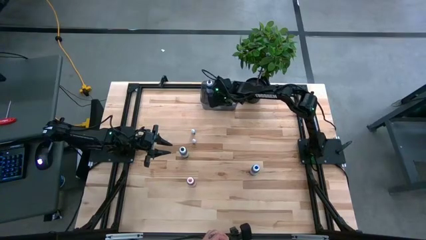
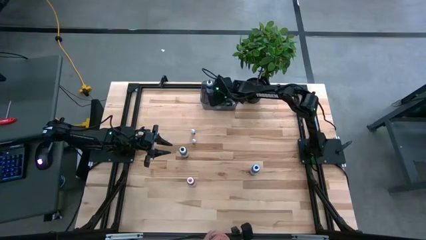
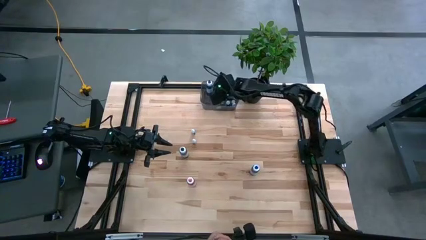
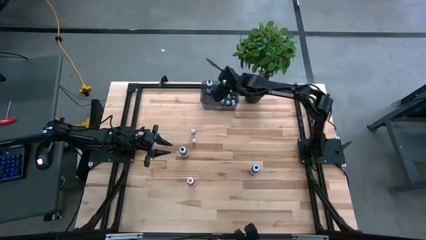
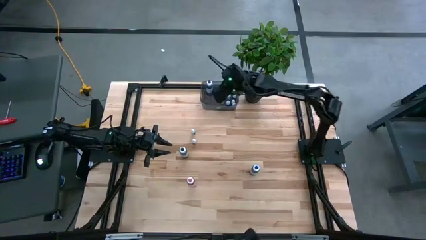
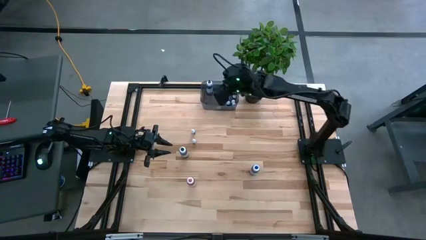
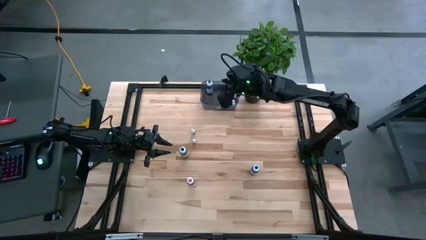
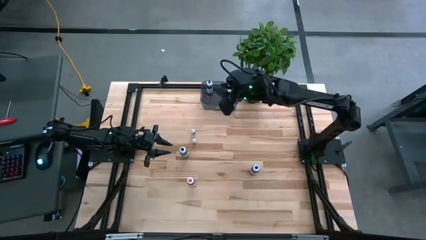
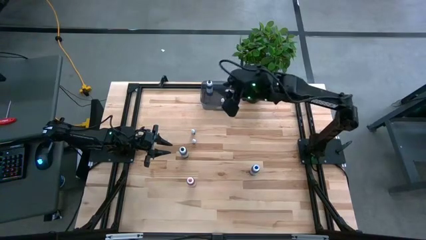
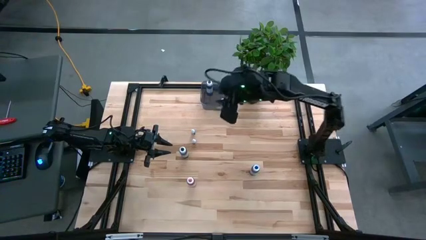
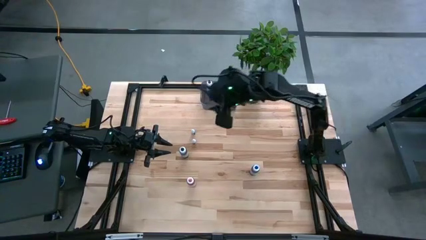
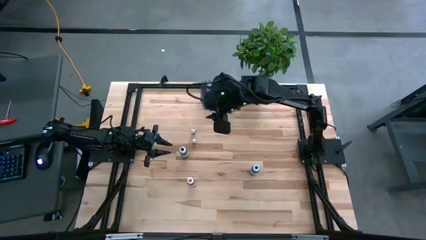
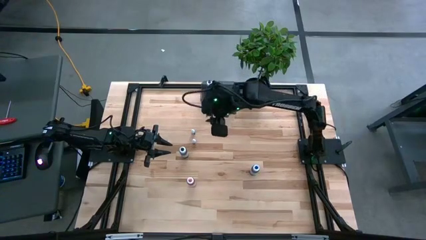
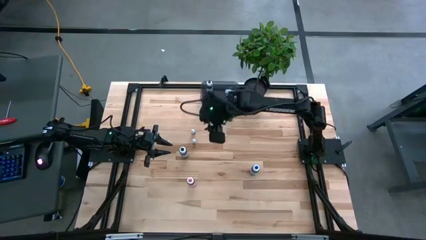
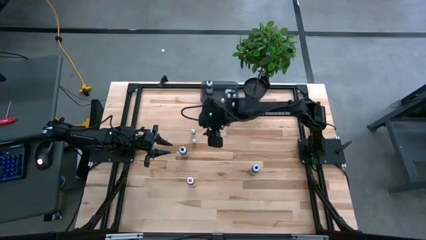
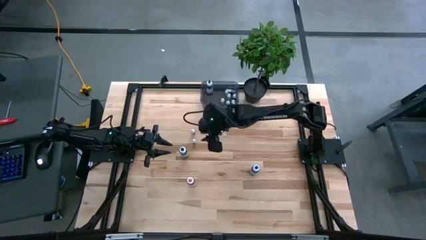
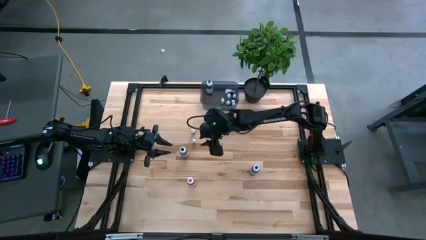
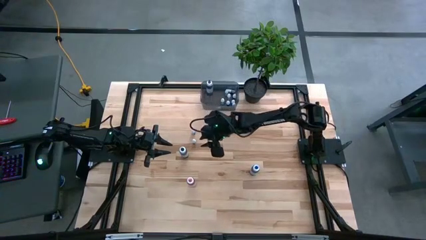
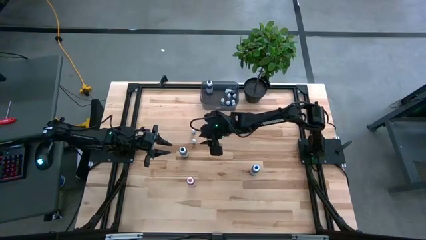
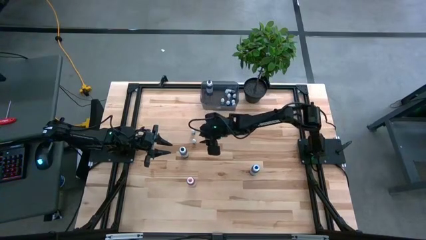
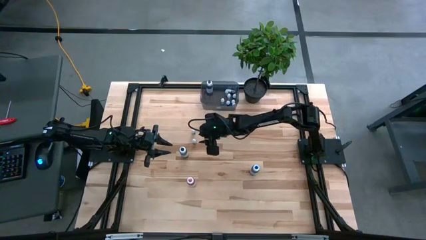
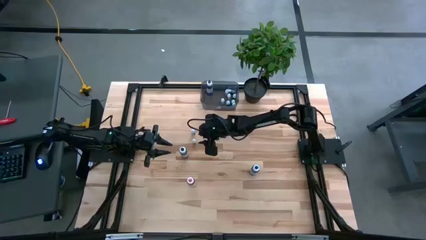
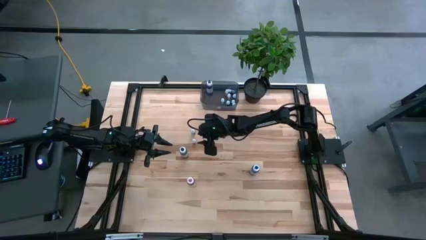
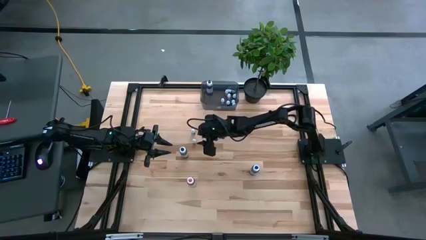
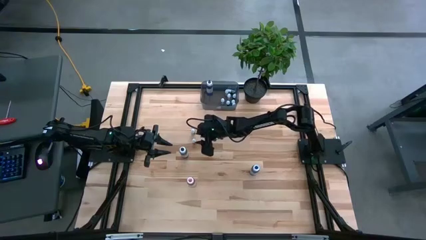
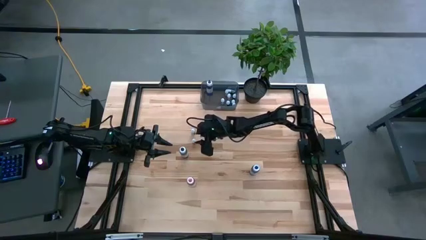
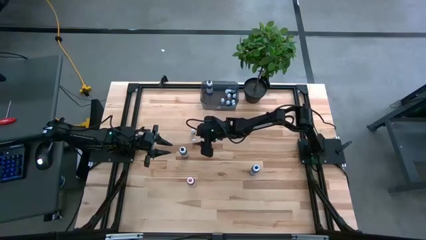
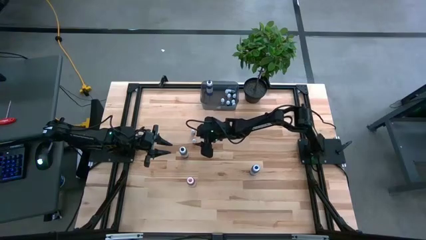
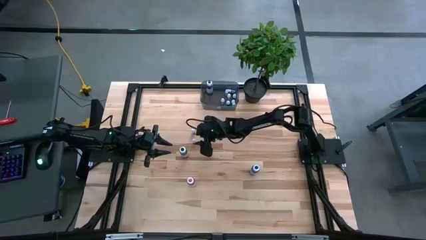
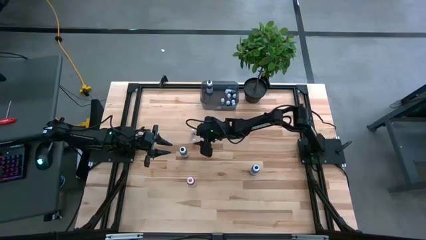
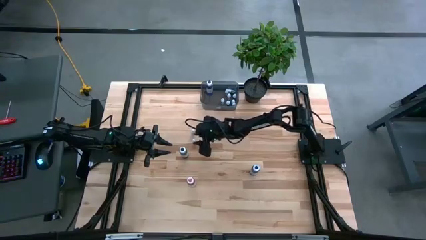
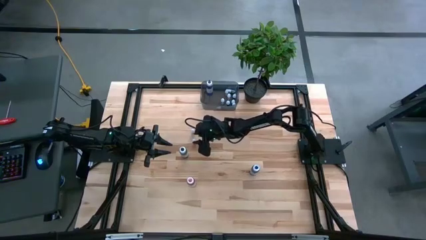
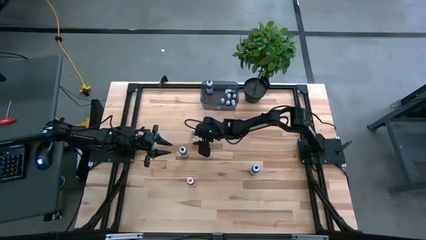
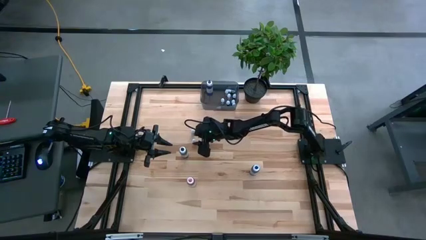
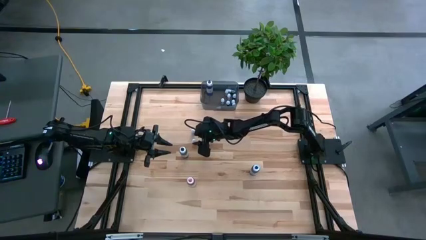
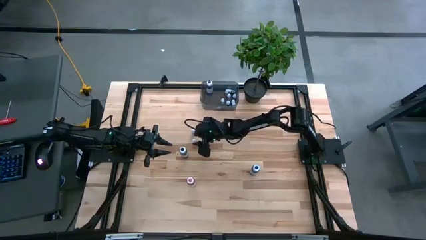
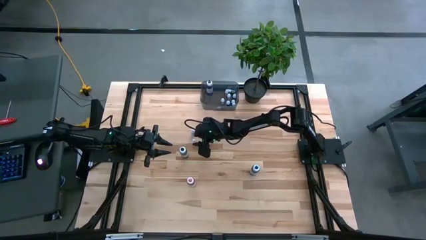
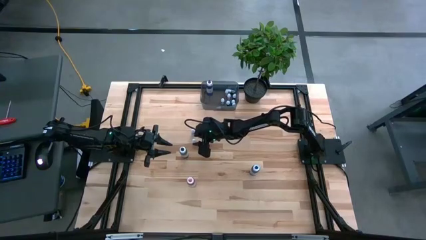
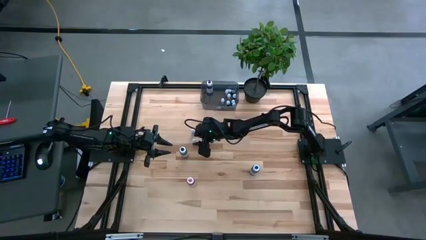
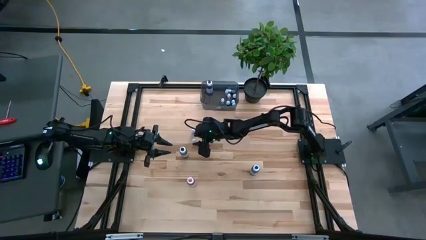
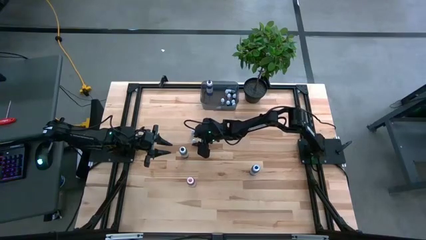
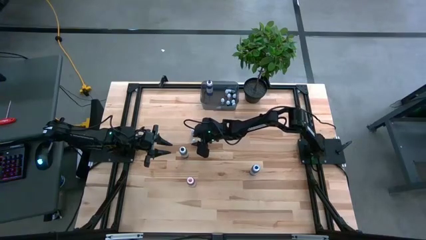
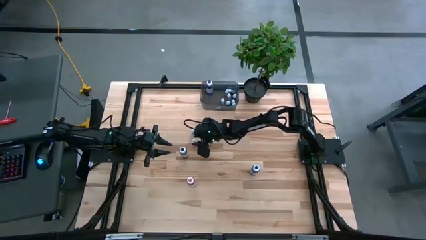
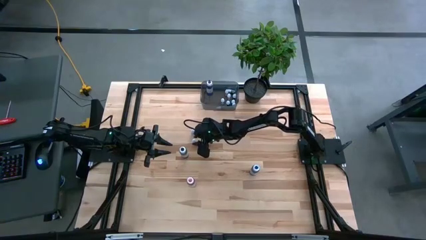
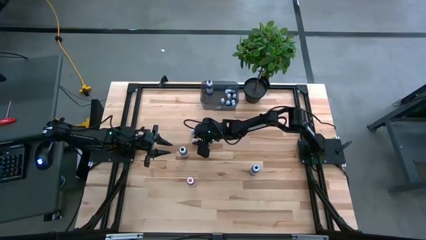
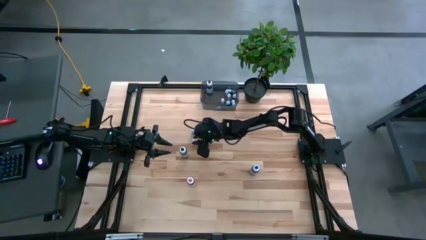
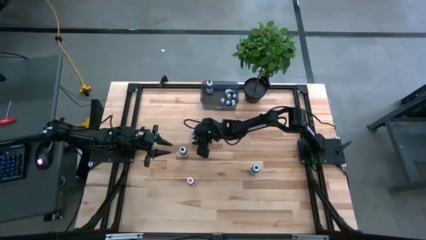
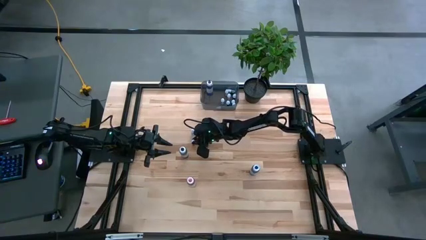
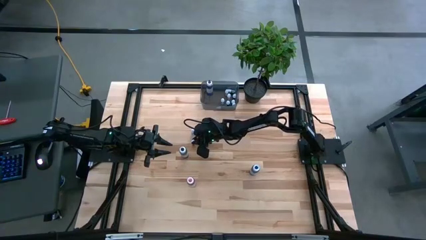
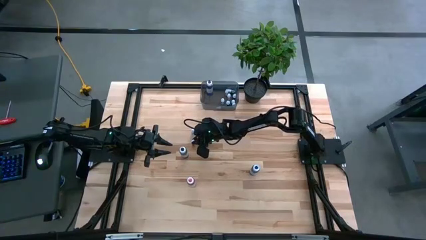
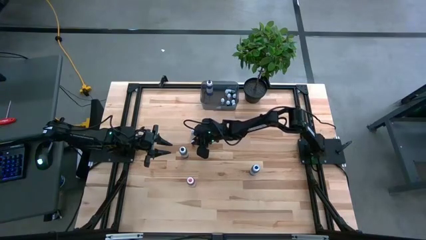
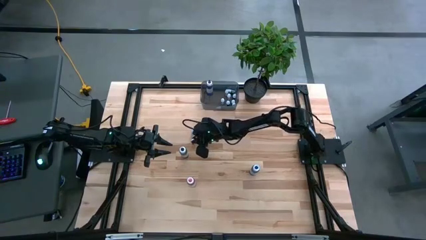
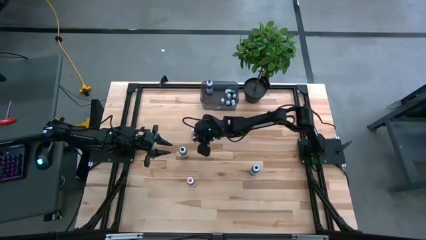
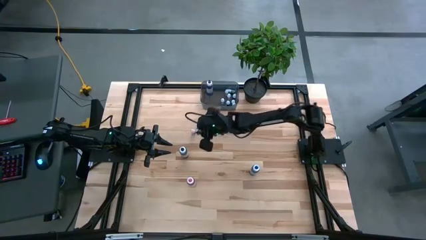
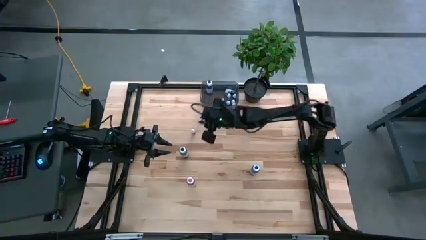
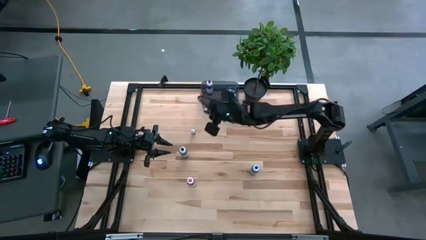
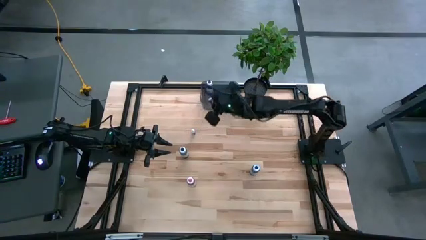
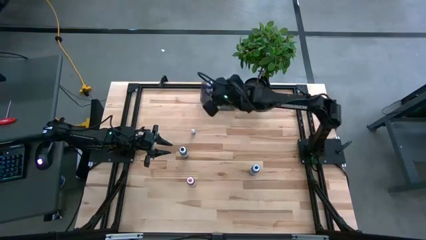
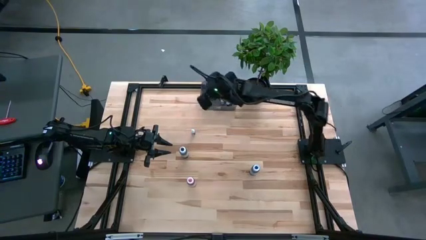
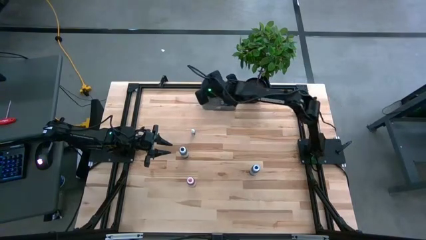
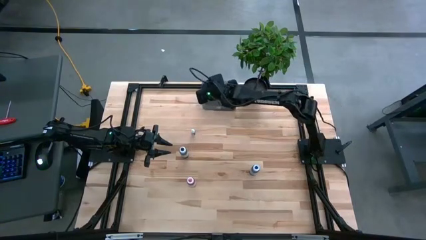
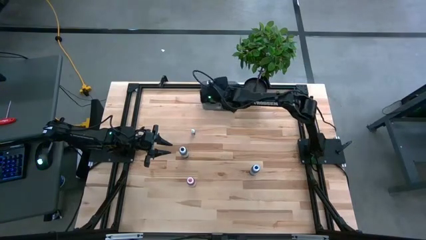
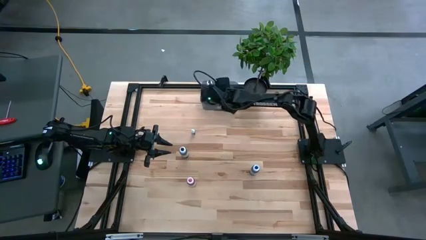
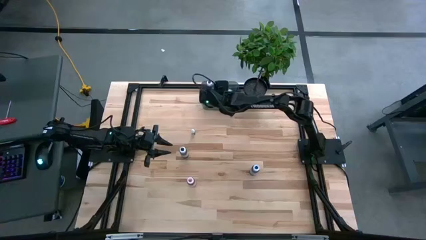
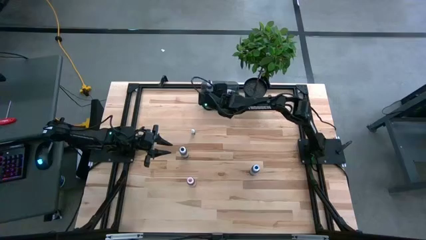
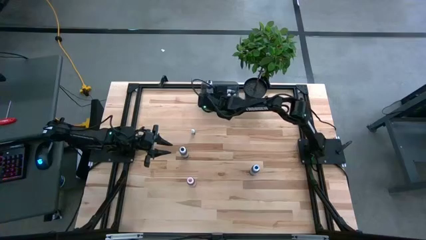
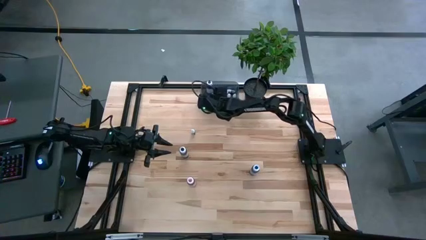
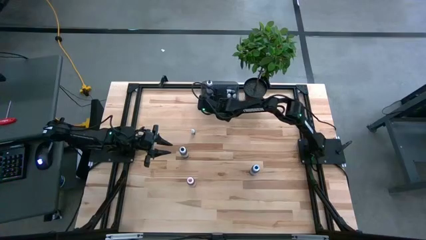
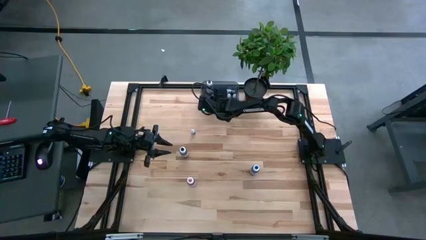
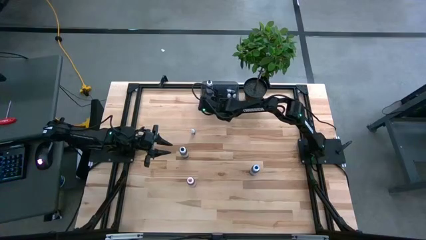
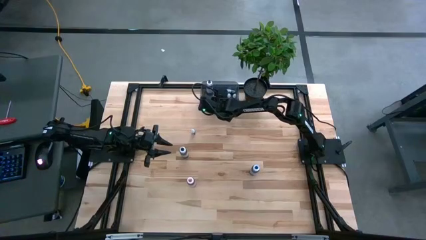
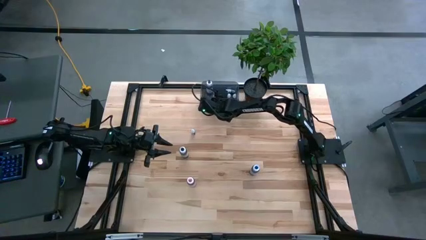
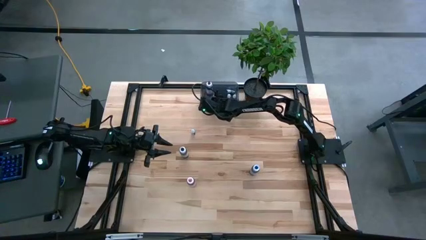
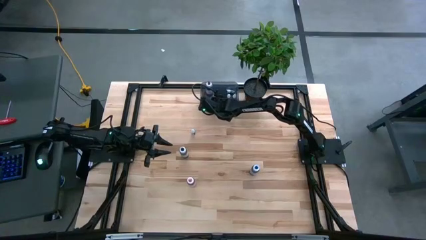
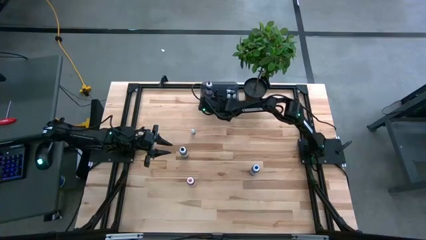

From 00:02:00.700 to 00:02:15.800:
Task: Pick & Place food coloring
Put the small red food coloring bottle into the black bin
